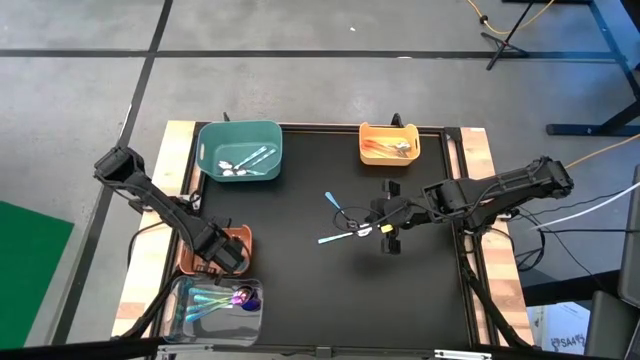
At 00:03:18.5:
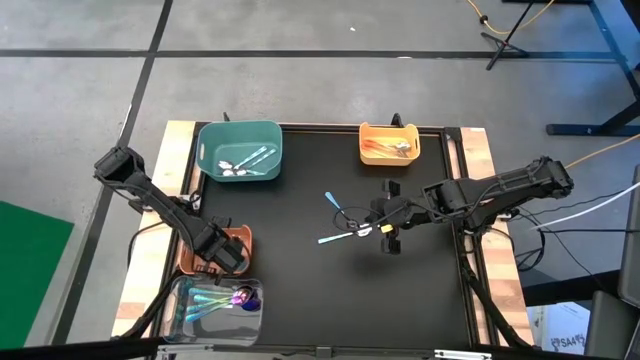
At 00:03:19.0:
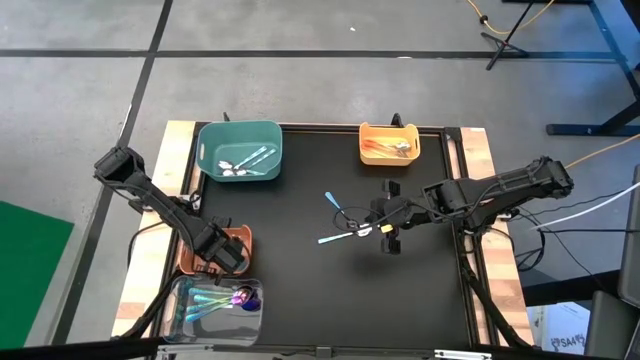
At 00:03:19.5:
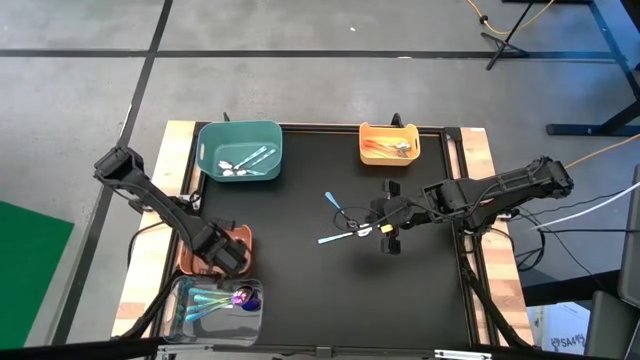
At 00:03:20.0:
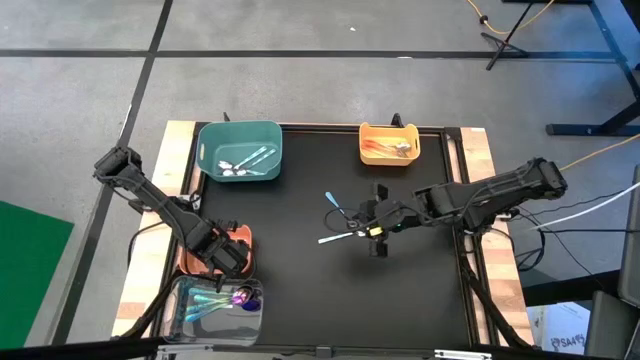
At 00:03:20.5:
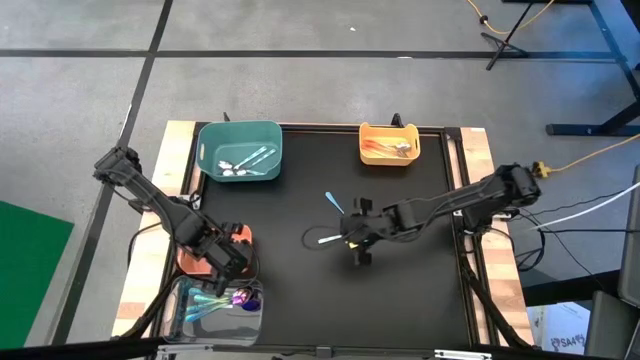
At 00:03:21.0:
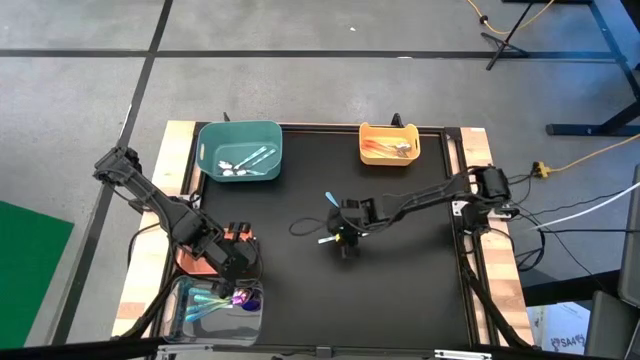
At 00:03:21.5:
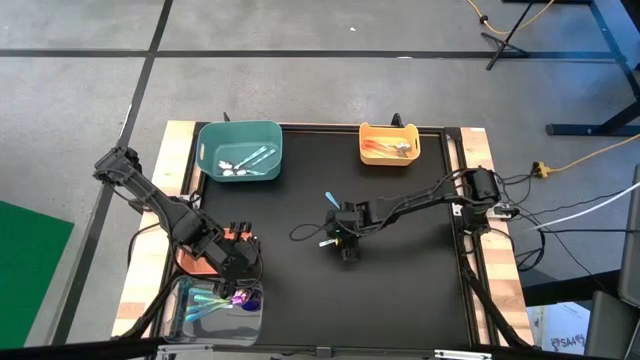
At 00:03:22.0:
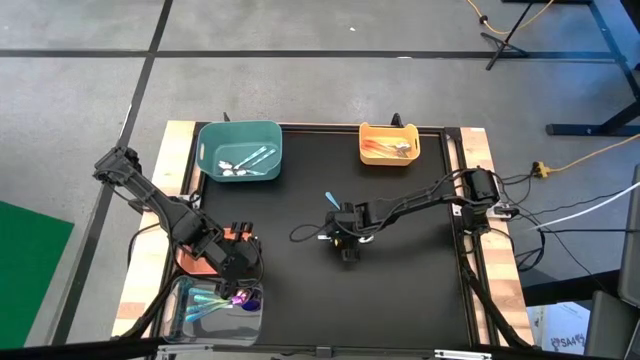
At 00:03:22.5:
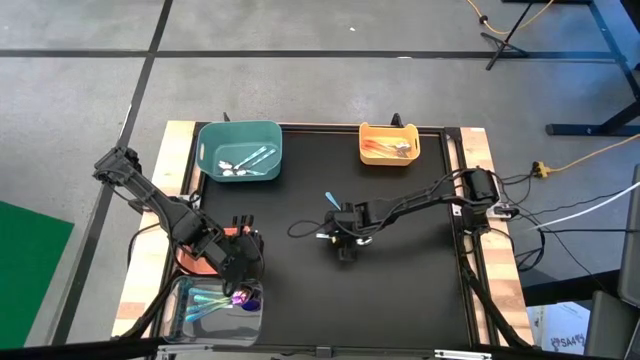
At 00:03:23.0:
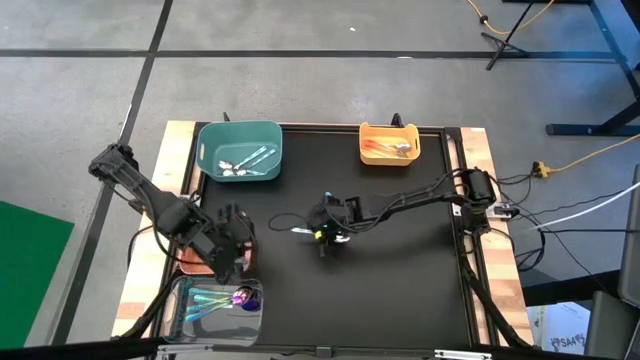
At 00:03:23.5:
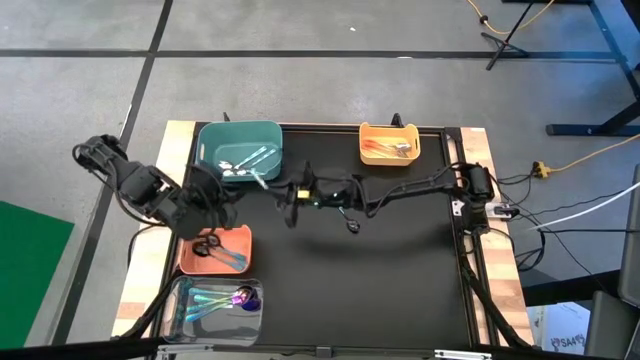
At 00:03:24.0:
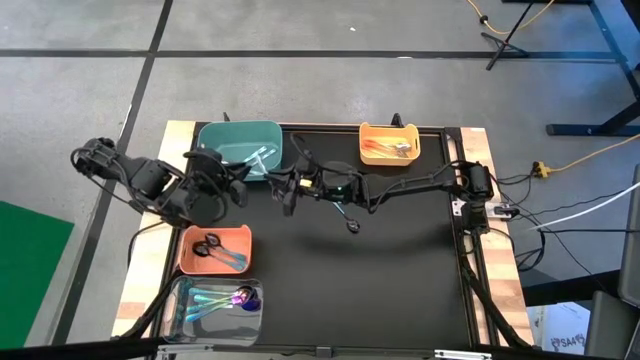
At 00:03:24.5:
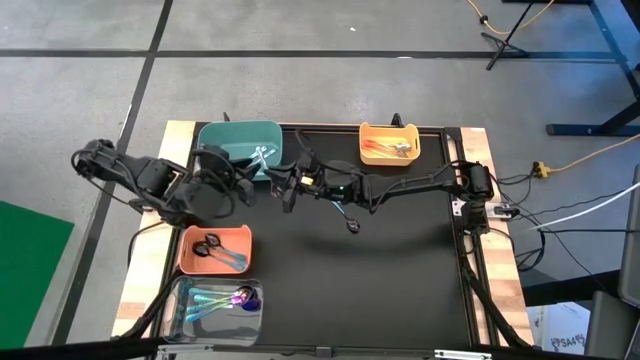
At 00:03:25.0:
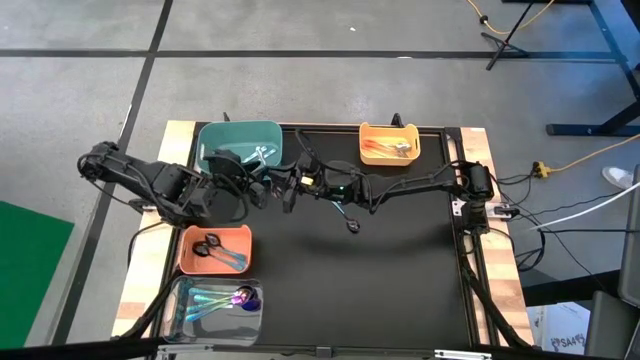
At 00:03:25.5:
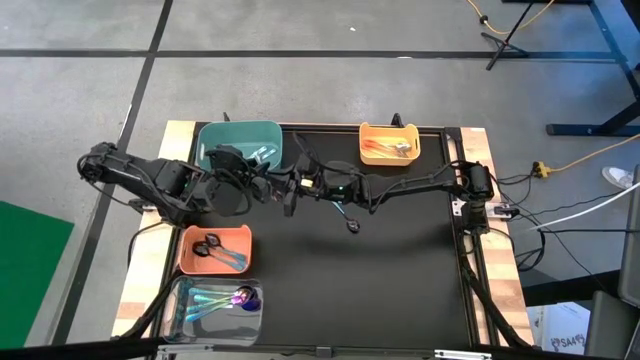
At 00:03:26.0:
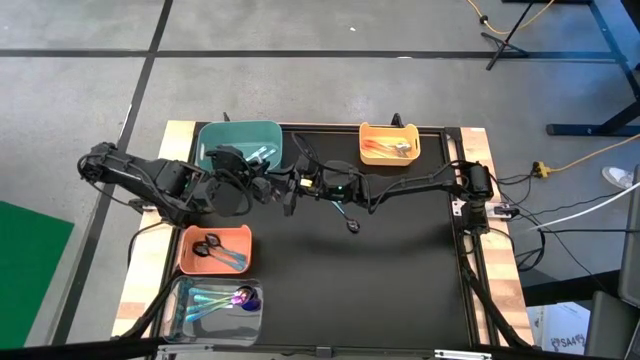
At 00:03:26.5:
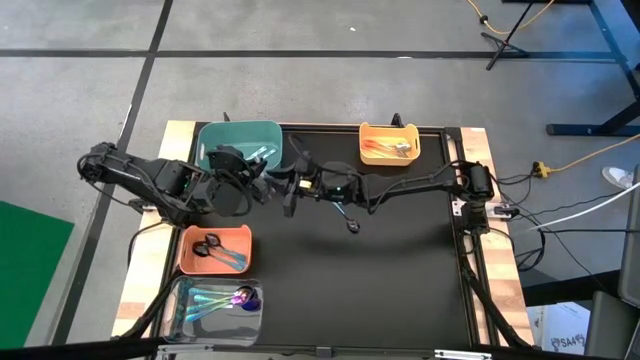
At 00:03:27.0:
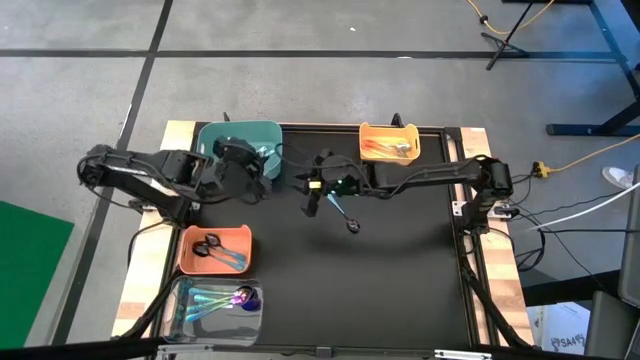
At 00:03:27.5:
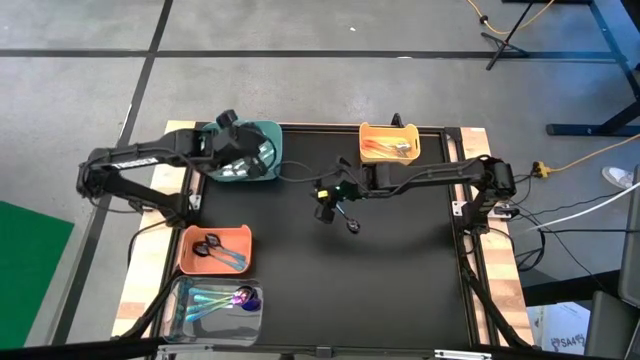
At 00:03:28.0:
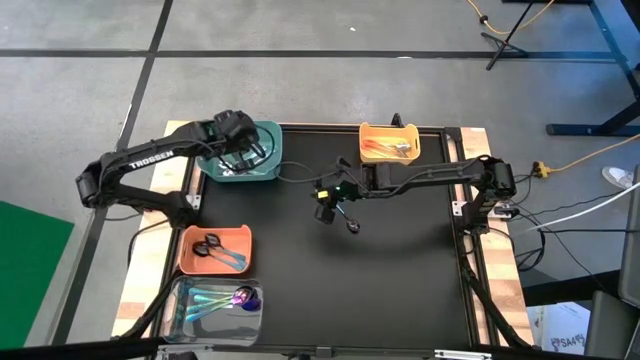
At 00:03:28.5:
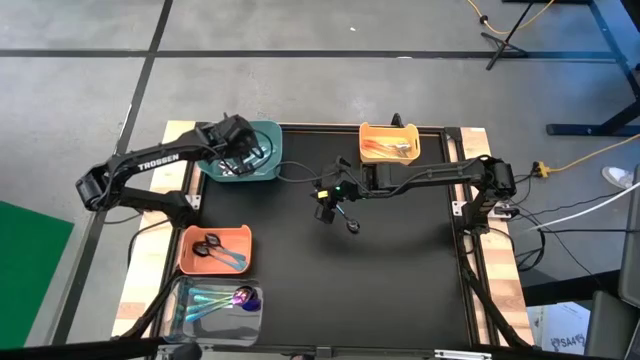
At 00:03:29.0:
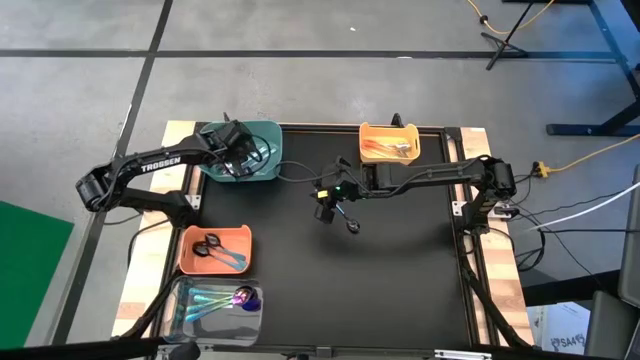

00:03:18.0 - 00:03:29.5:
Task: Sort silverware by color (type)
Put the blue spoon into the blue bin

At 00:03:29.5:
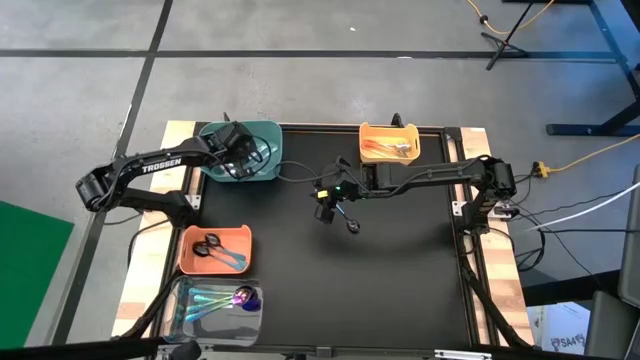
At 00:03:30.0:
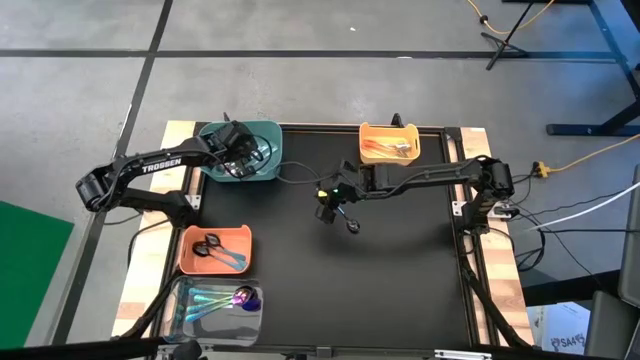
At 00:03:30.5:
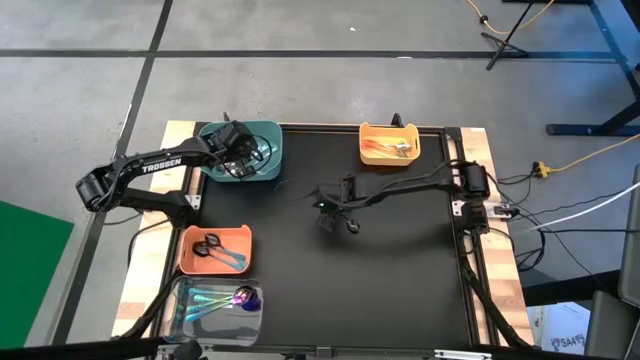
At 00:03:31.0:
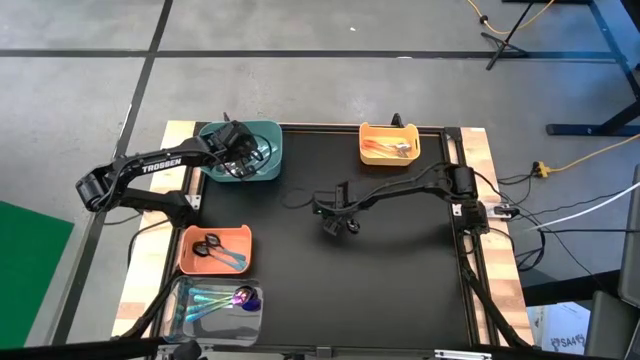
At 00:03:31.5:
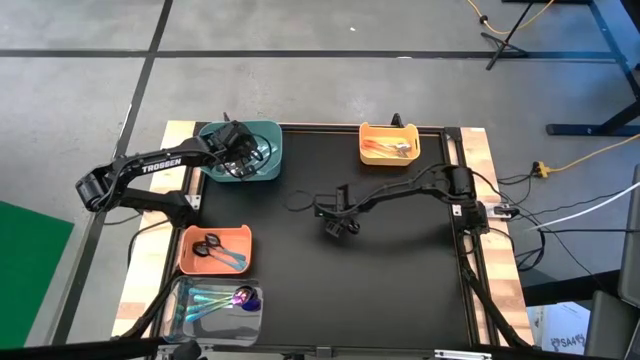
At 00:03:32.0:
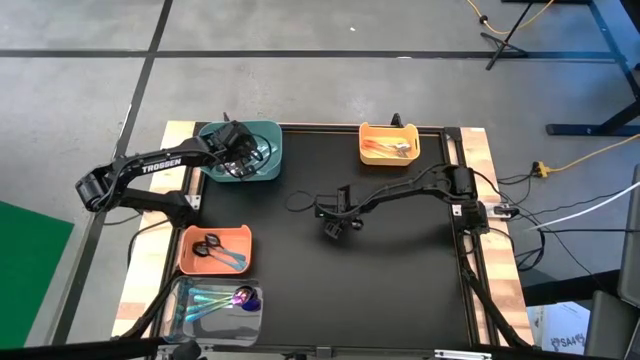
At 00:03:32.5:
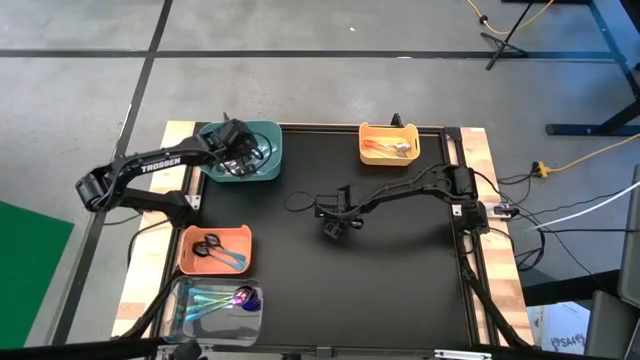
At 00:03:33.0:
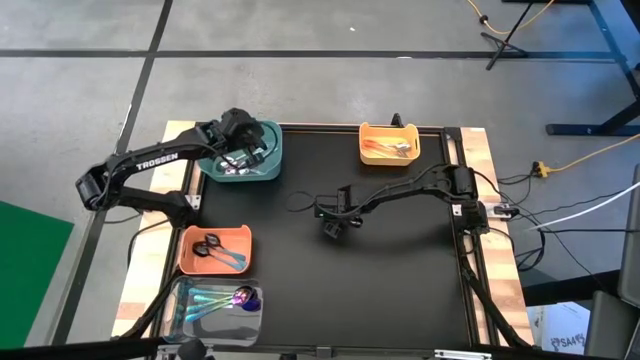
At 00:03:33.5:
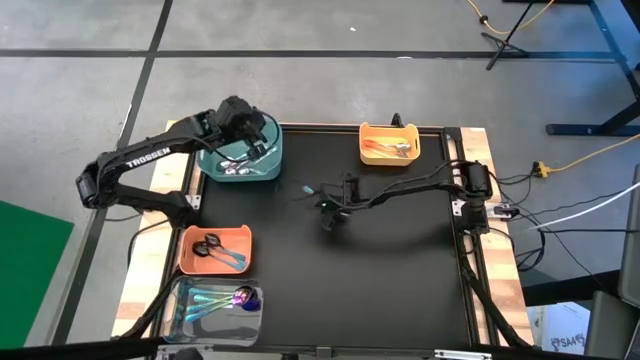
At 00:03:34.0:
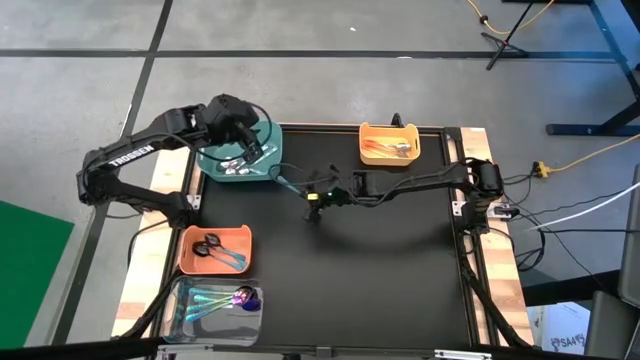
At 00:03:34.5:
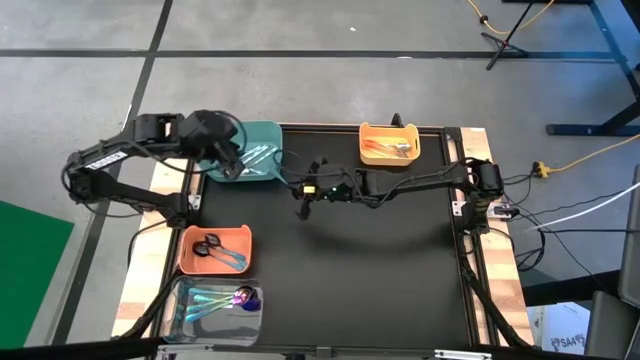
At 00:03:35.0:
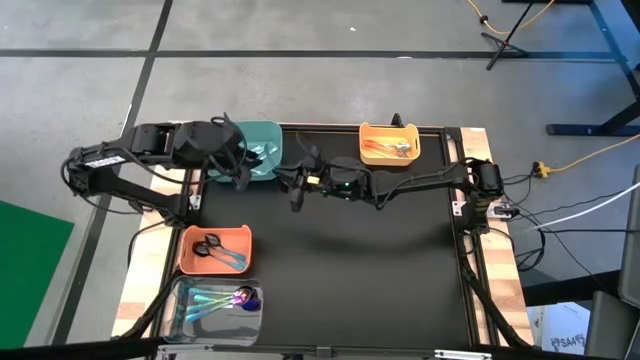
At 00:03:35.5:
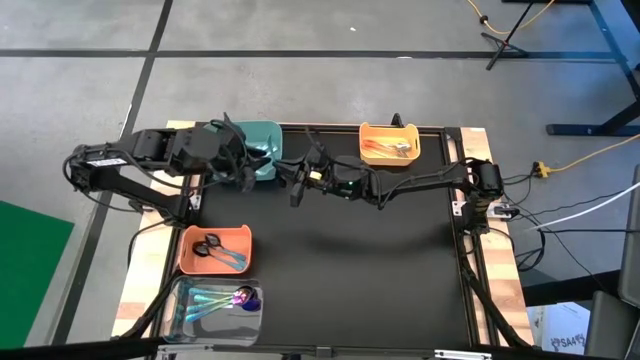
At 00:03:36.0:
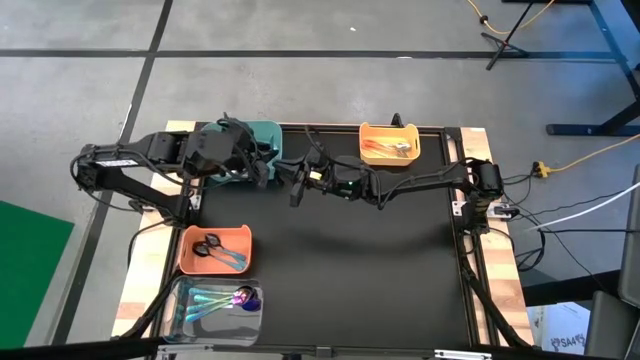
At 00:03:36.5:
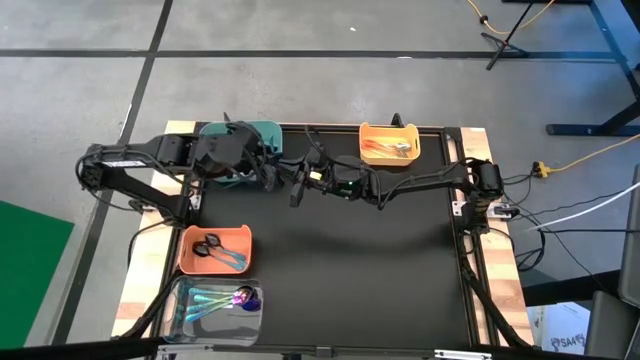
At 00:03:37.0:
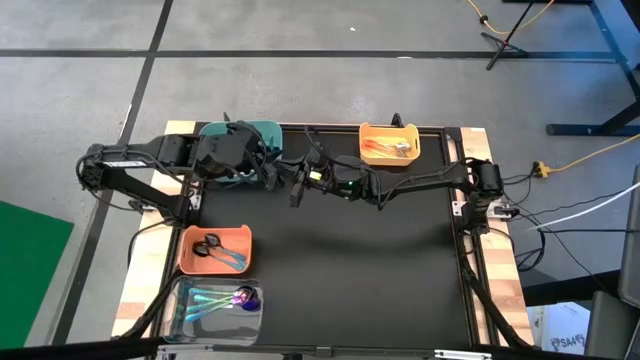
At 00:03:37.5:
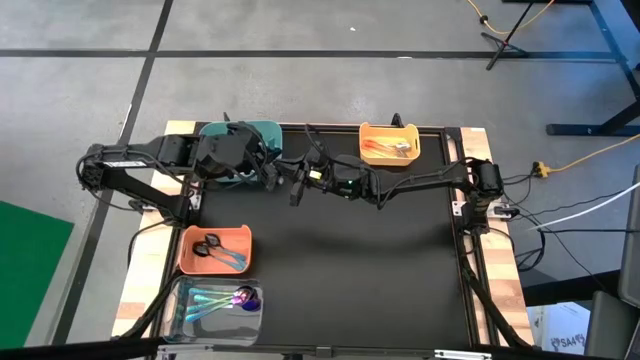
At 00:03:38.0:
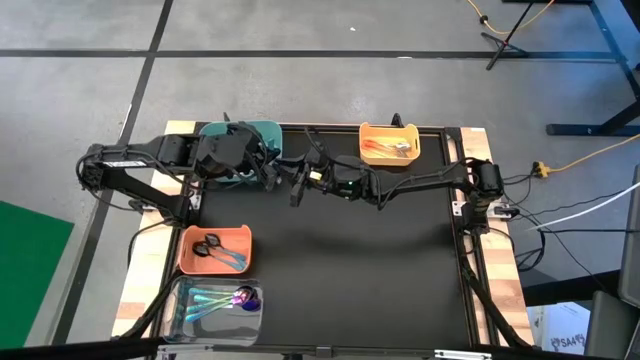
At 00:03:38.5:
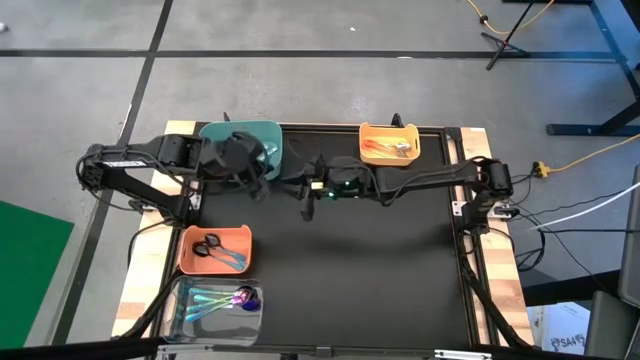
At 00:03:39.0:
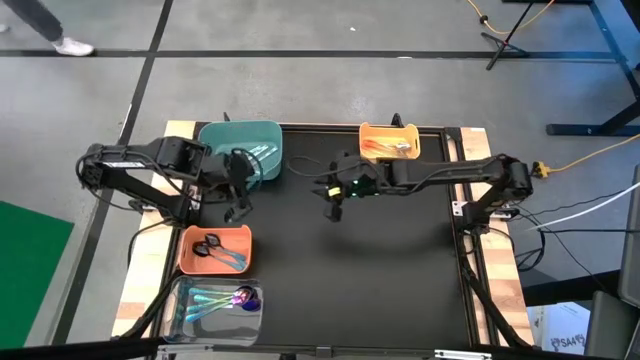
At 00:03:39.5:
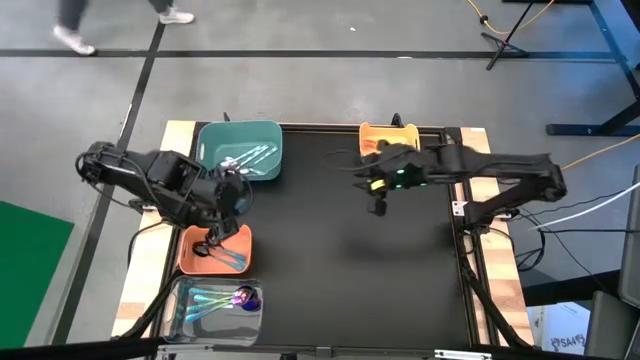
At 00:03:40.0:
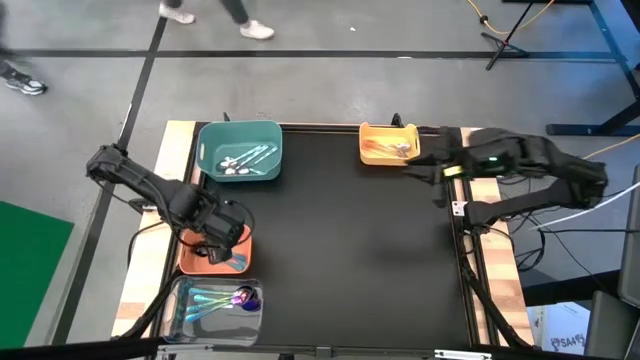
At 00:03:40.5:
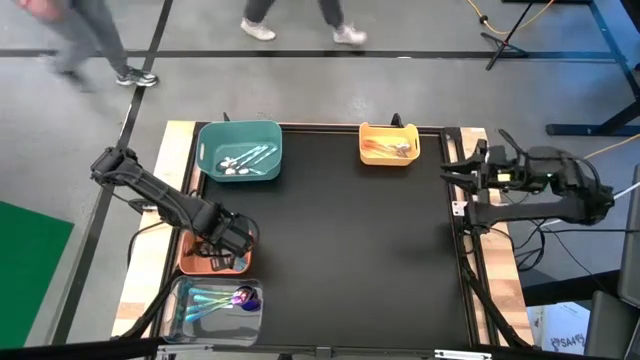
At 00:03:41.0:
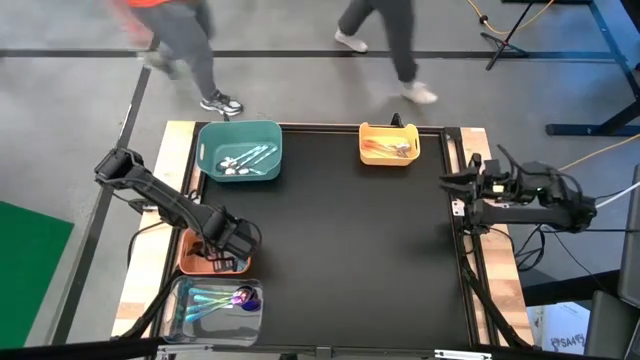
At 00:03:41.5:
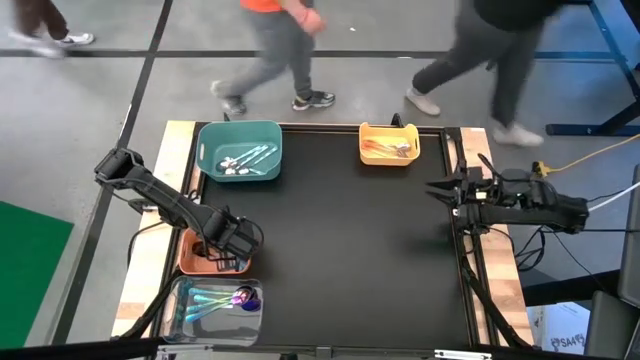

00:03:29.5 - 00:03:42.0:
Put the light blue spoon into the orange bin
